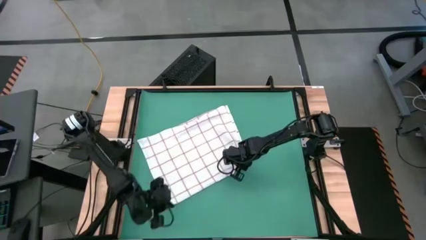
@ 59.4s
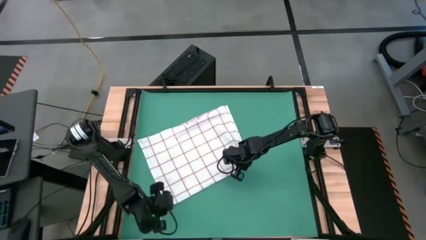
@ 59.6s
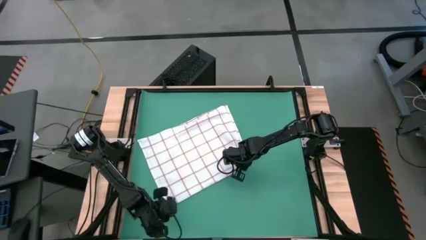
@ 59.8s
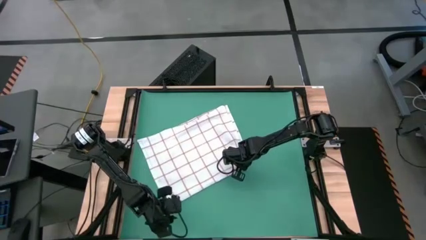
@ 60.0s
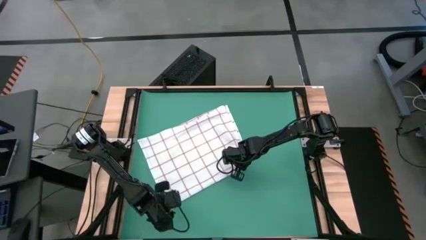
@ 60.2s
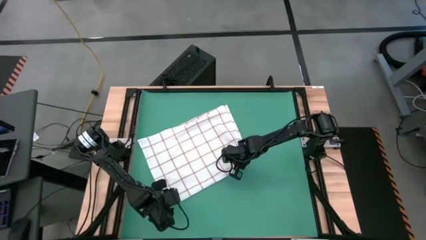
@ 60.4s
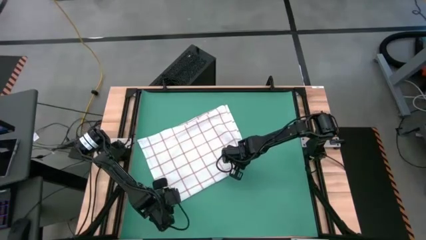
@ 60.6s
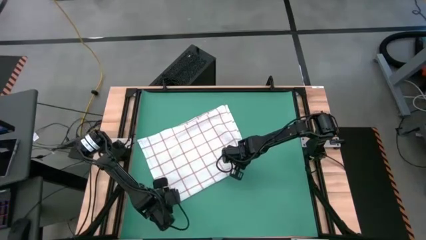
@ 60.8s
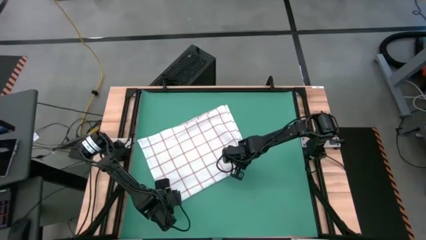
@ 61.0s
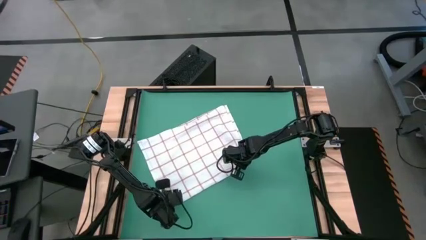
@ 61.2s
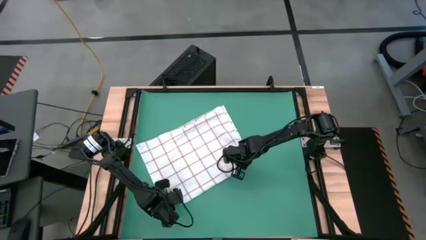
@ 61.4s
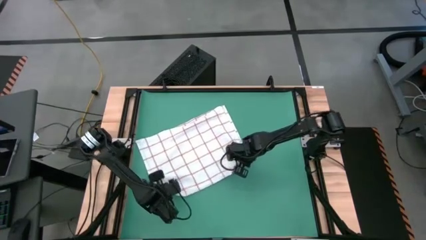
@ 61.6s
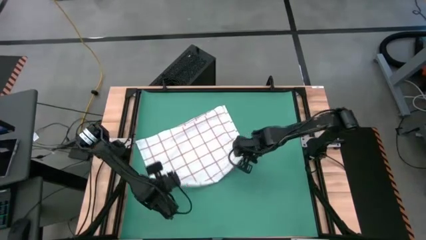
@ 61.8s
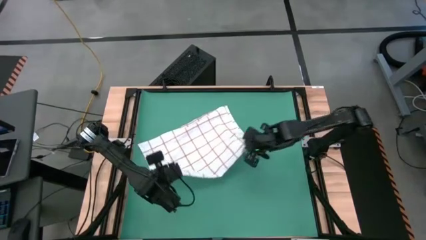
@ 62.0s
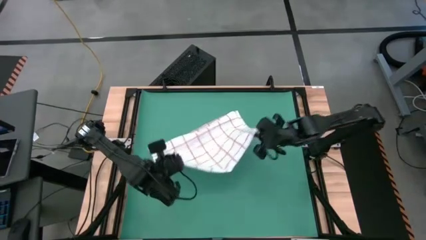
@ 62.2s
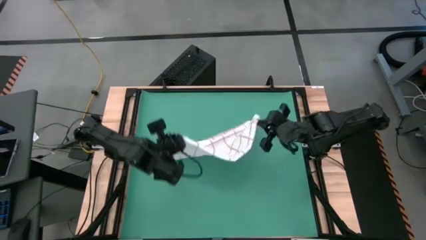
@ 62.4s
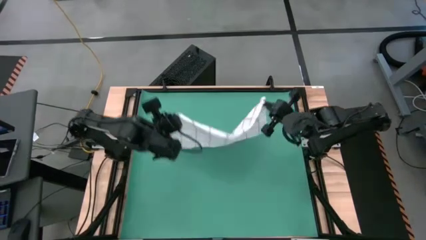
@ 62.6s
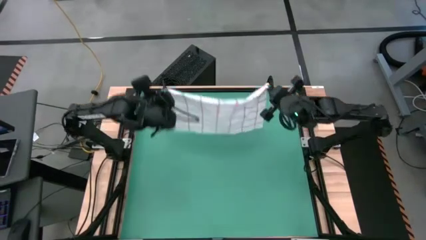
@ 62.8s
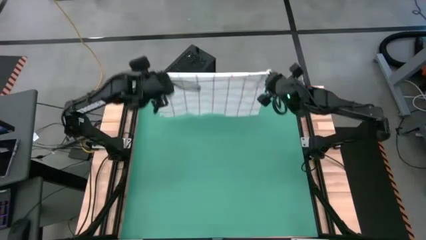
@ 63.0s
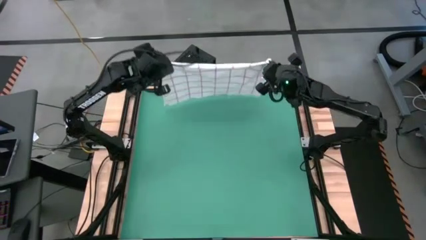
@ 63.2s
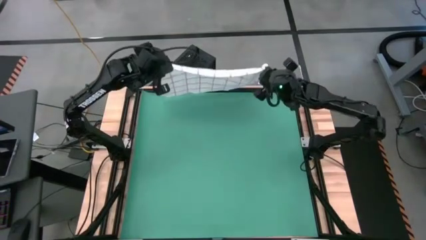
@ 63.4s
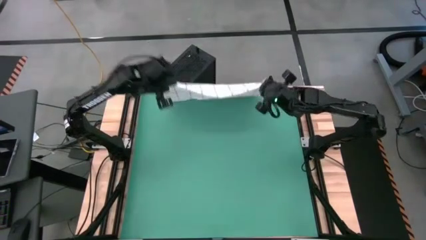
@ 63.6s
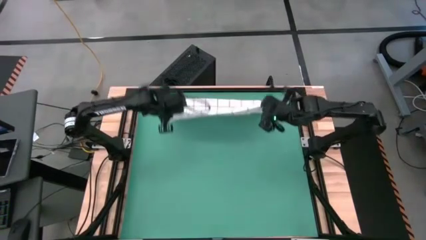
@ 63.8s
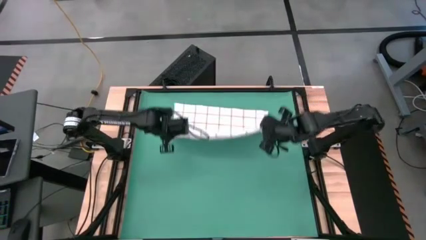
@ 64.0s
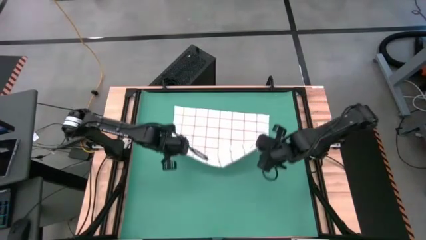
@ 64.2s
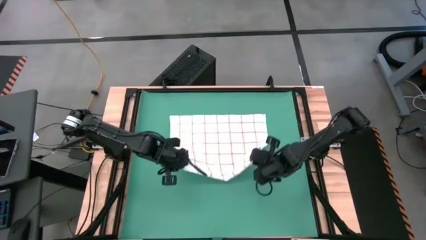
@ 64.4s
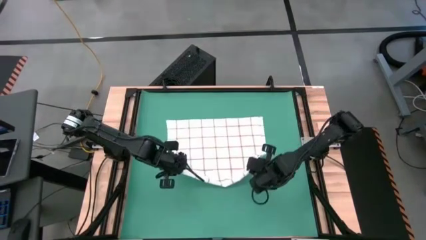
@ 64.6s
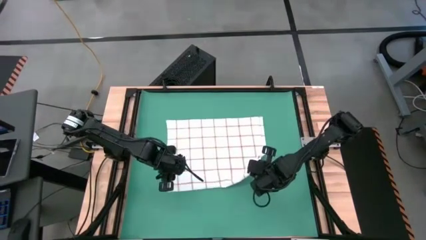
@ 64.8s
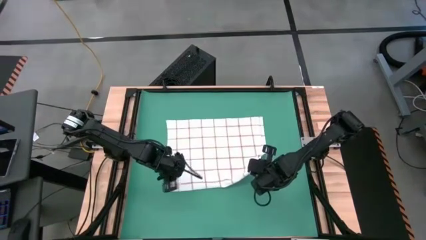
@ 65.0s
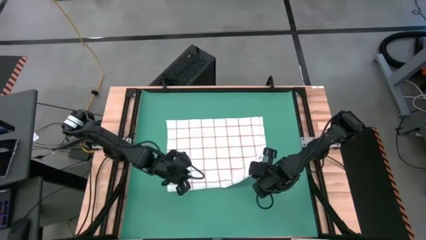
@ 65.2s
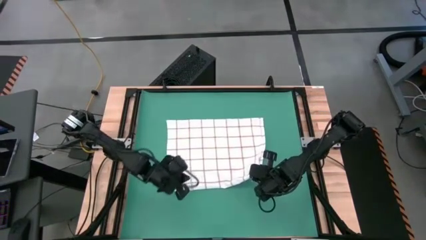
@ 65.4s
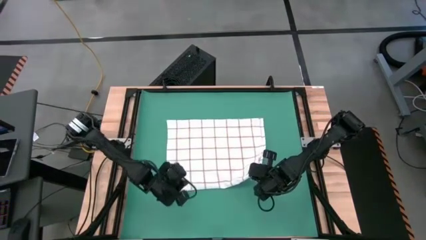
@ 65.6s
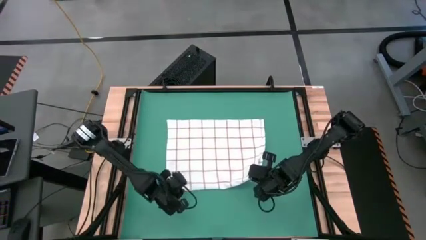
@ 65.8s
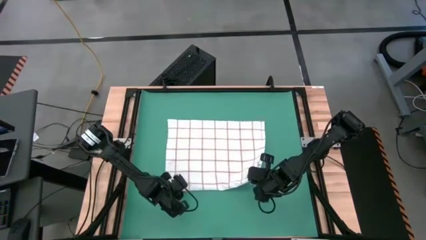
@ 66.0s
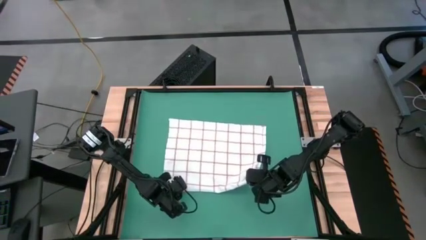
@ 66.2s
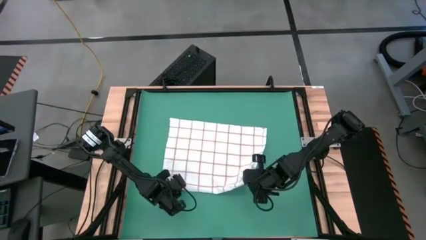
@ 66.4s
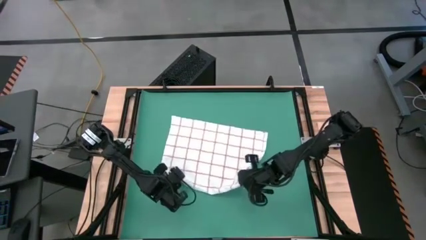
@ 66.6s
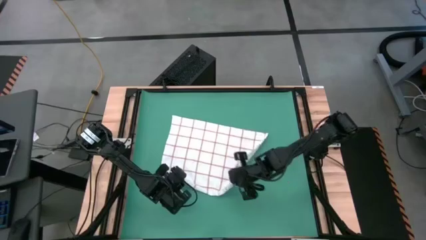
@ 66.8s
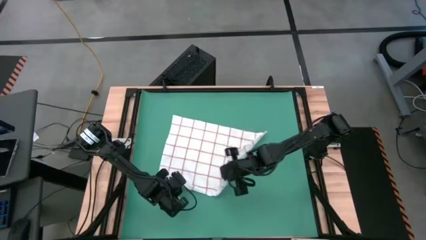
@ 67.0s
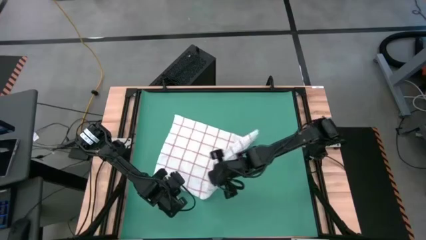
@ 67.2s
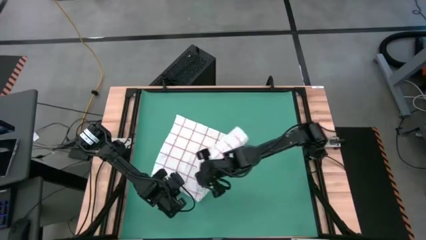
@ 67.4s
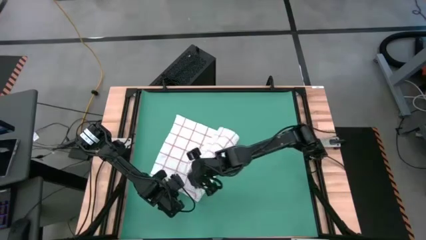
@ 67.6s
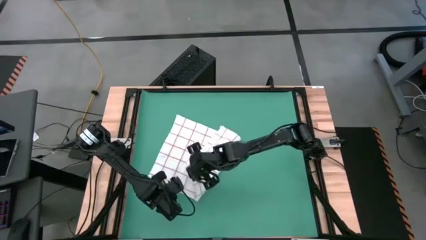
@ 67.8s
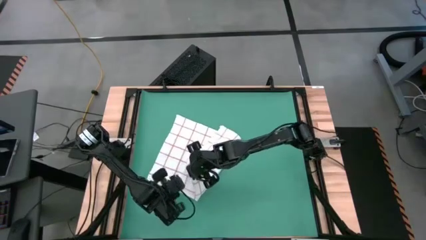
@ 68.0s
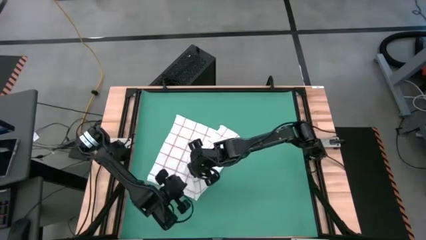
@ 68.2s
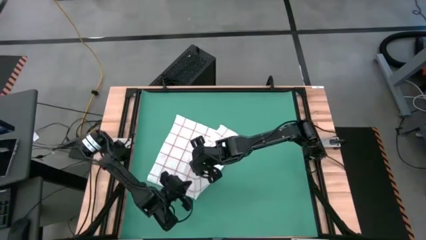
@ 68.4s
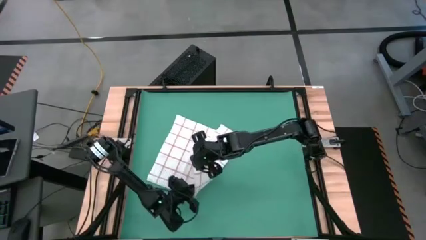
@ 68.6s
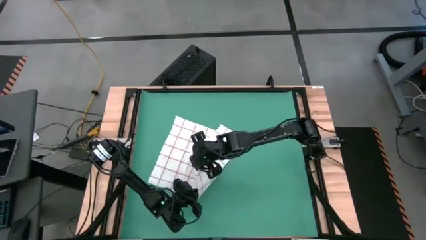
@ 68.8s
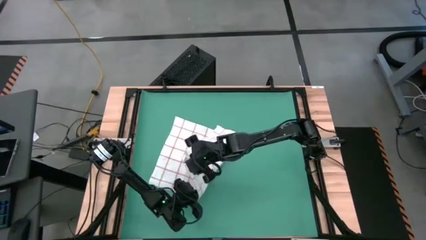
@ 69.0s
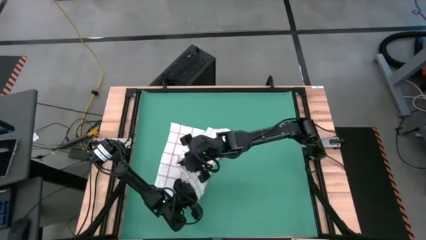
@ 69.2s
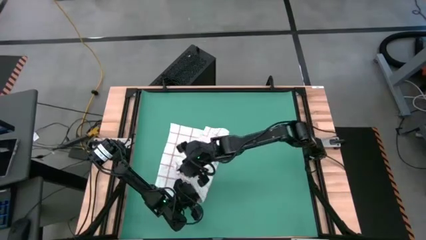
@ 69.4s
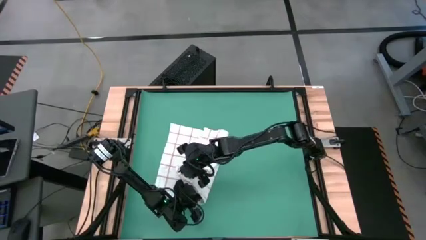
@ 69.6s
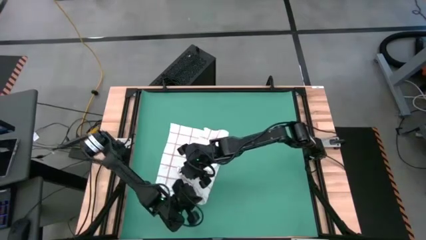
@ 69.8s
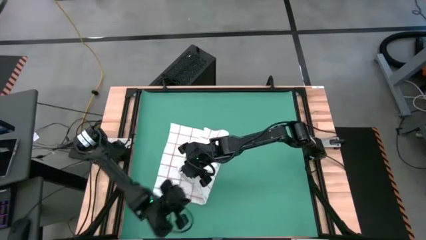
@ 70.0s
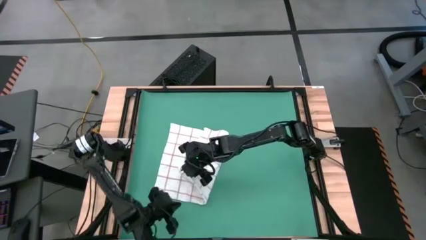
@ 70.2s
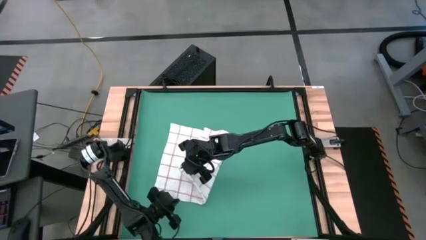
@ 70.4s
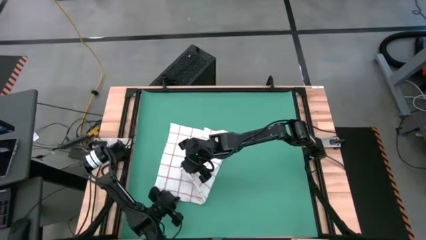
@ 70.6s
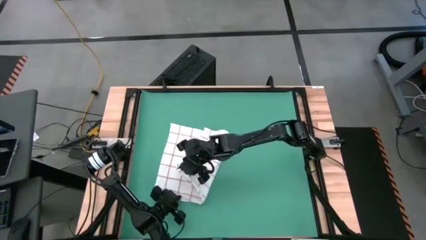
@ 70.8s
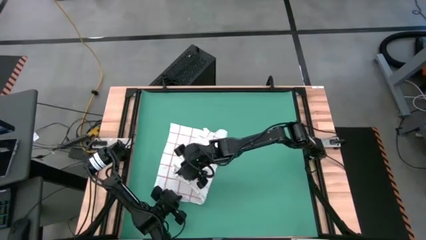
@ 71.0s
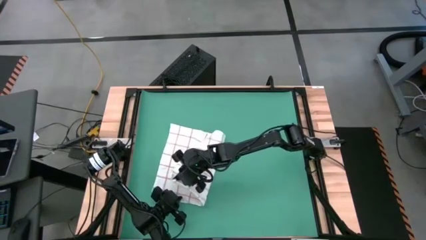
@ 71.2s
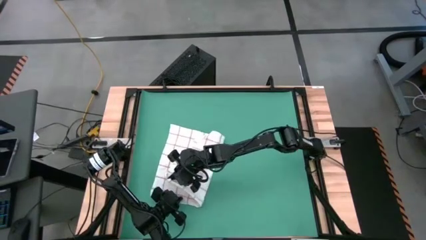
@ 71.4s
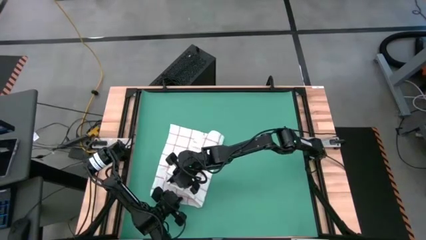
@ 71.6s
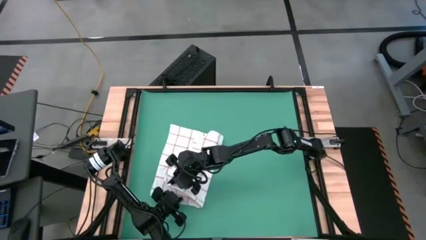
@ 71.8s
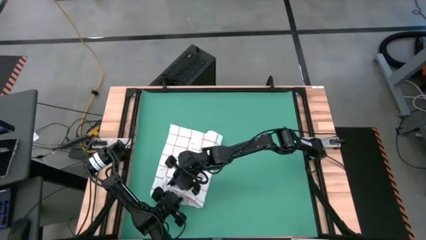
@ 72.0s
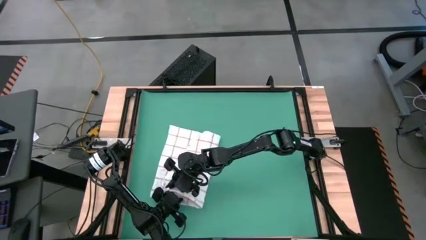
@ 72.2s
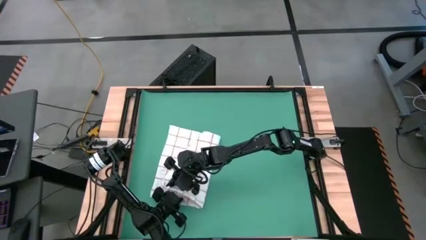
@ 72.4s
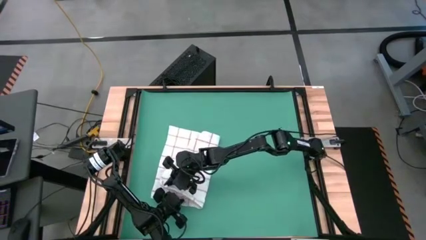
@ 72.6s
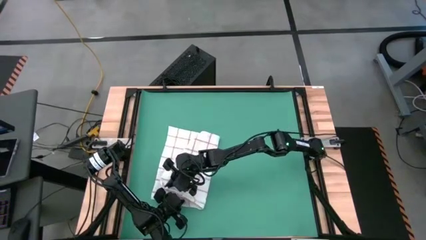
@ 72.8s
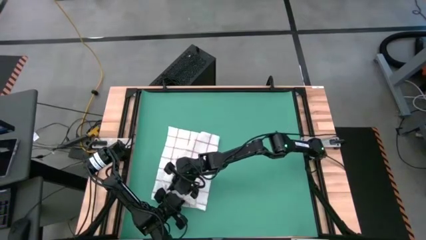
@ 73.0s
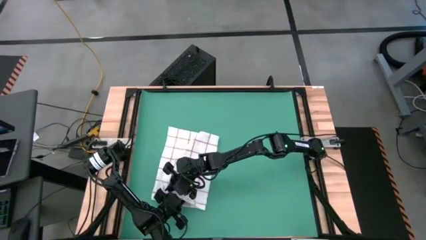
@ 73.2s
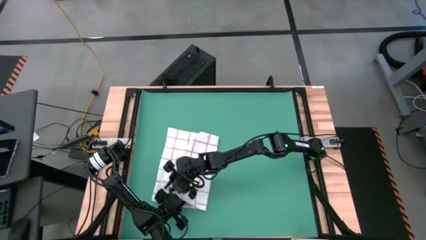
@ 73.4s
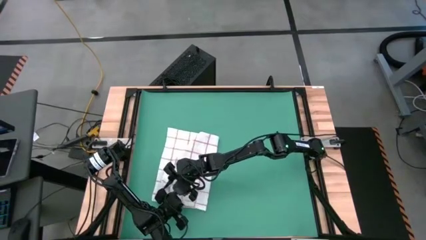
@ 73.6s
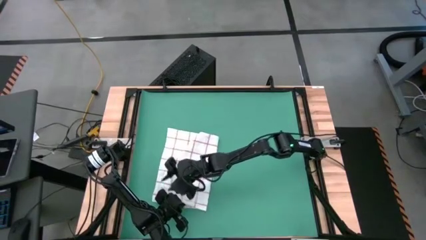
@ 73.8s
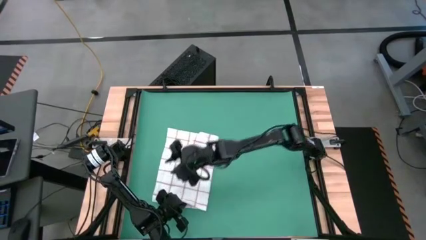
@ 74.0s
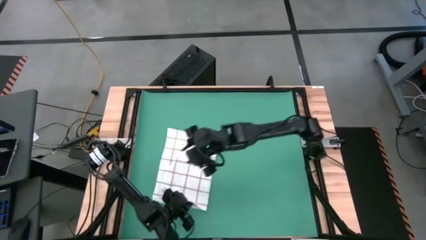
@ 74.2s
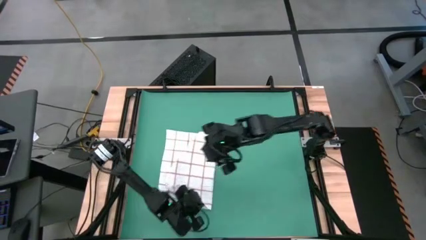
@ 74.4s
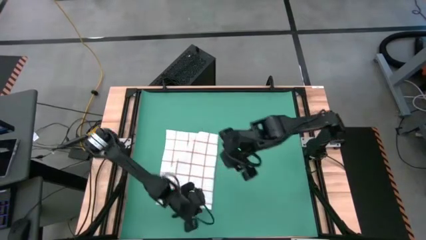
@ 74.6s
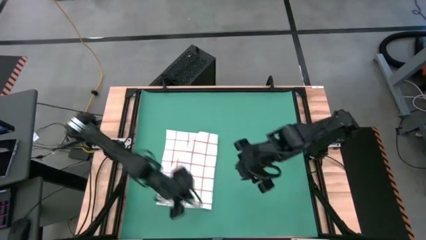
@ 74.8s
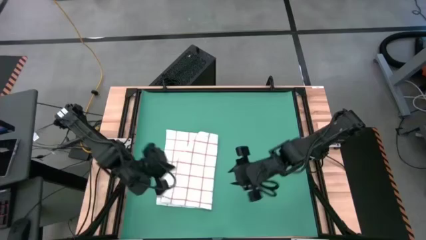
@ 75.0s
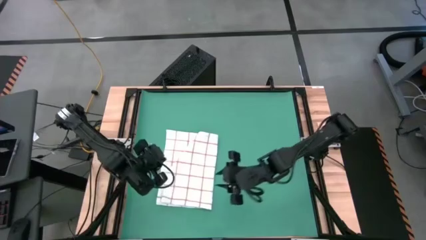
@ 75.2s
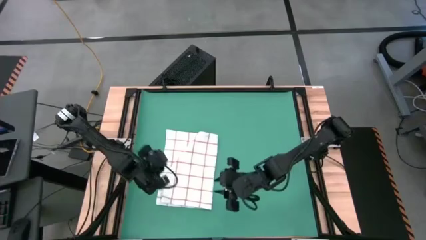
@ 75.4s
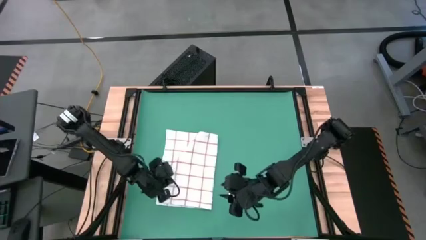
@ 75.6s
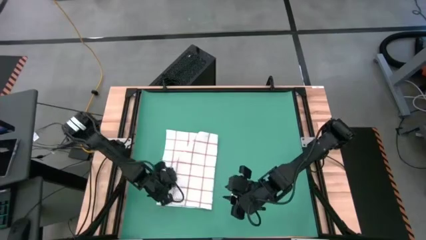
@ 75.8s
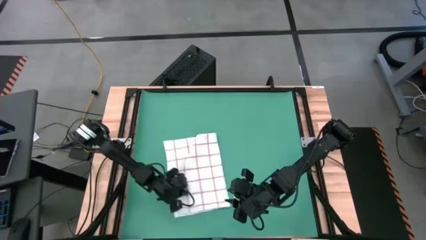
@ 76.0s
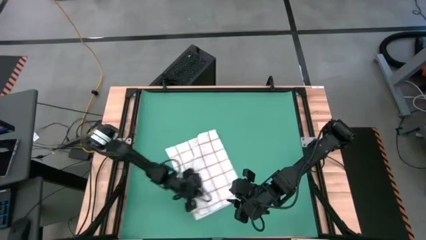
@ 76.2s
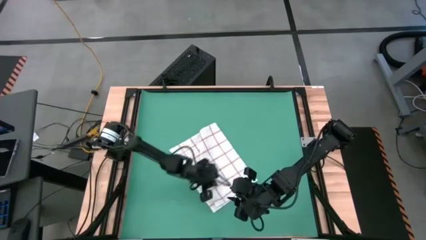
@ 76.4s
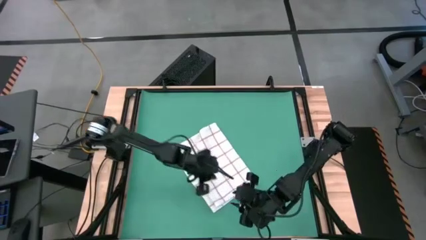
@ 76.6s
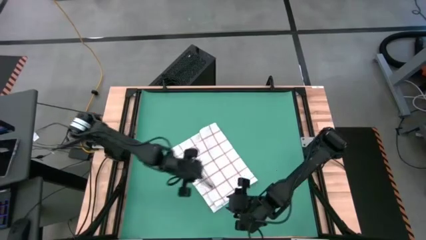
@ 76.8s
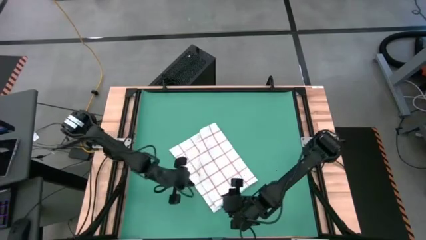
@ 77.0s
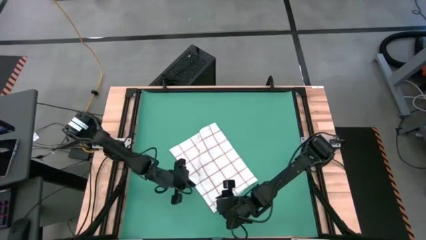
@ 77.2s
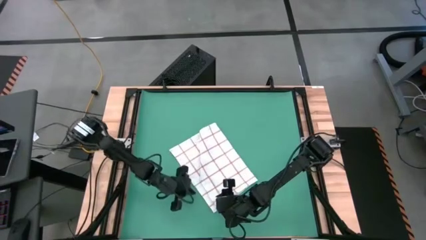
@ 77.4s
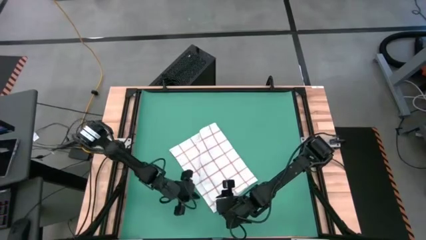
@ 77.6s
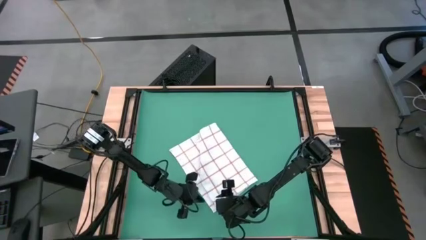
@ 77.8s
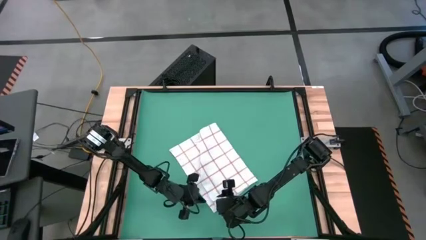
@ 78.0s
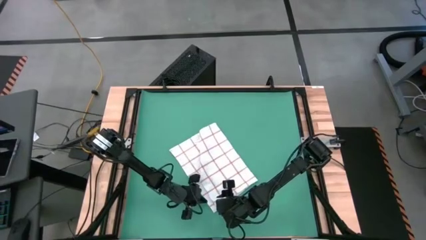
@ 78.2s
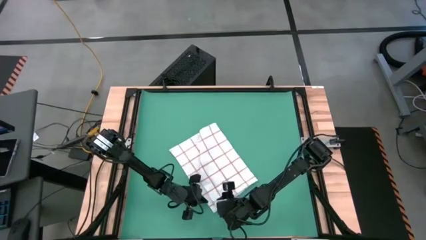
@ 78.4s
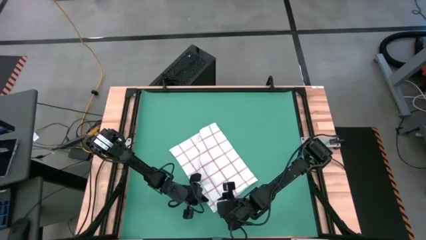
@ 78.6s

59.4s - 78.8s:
Task: Roll towel into tight, uniform cylinder
Roll the white towel
